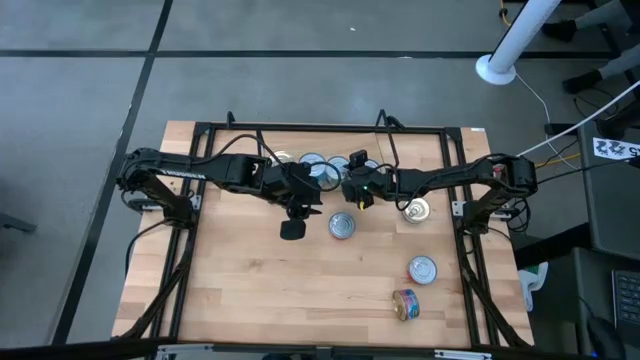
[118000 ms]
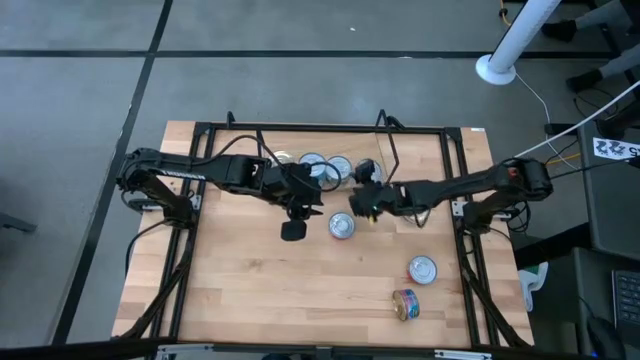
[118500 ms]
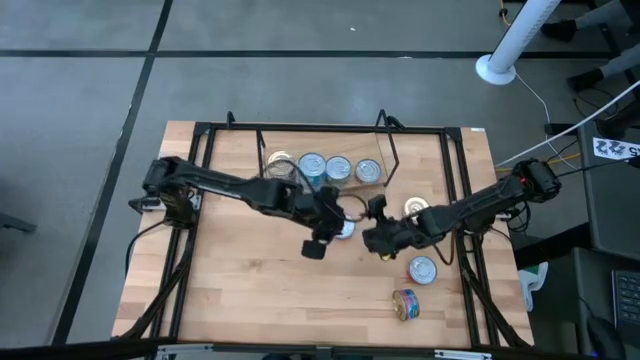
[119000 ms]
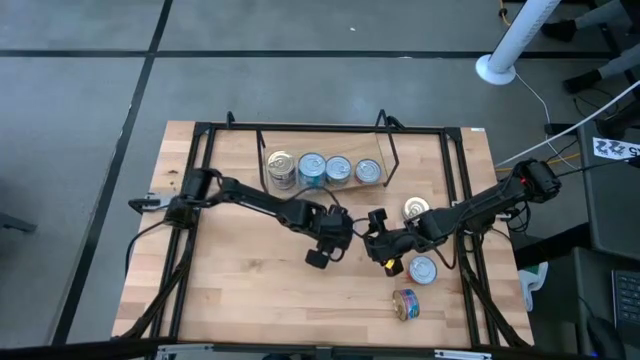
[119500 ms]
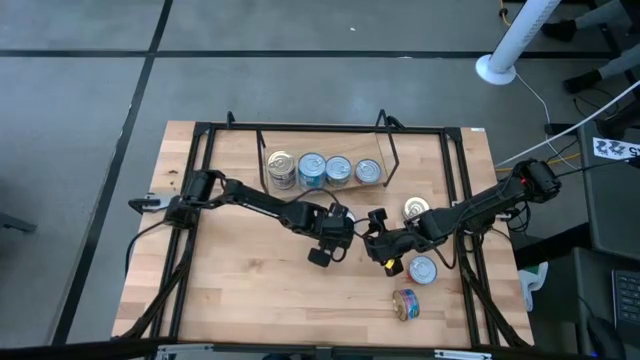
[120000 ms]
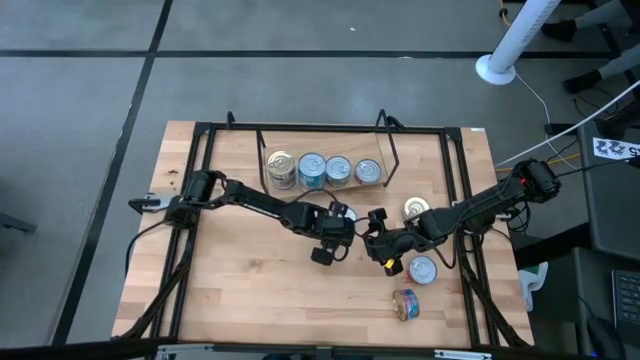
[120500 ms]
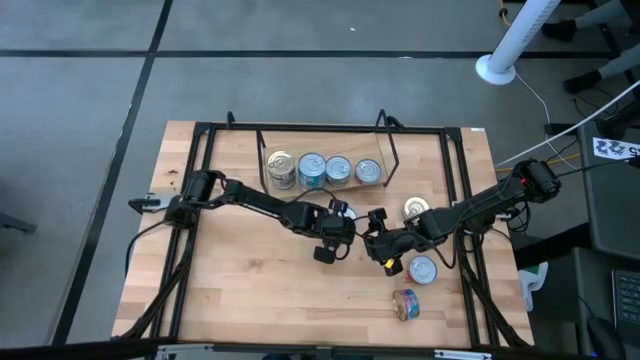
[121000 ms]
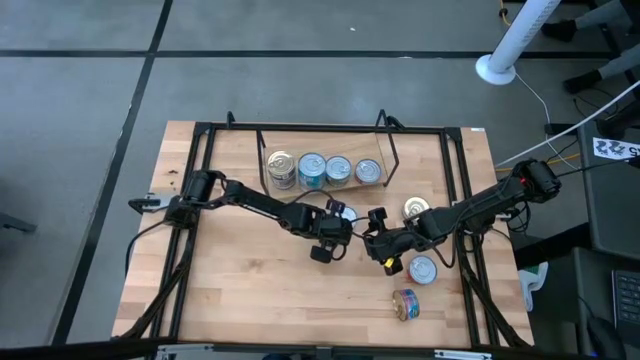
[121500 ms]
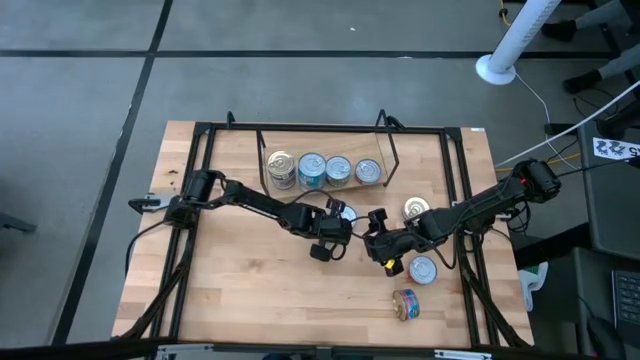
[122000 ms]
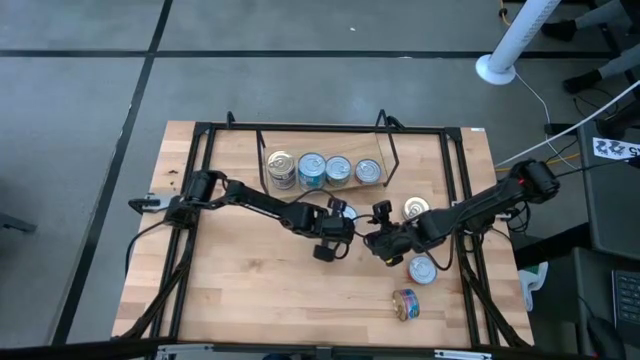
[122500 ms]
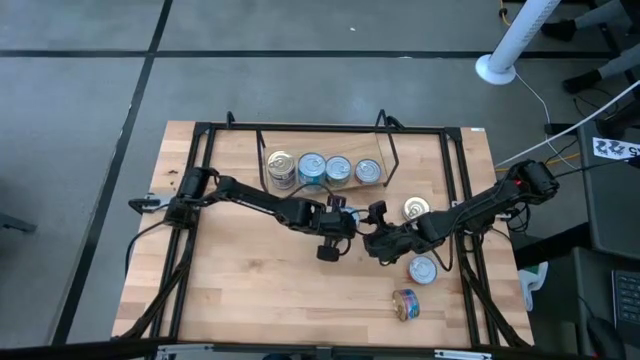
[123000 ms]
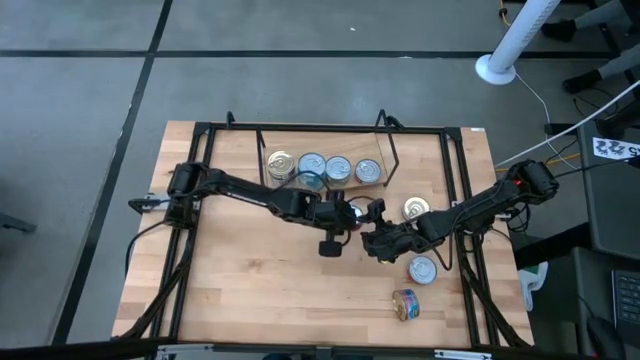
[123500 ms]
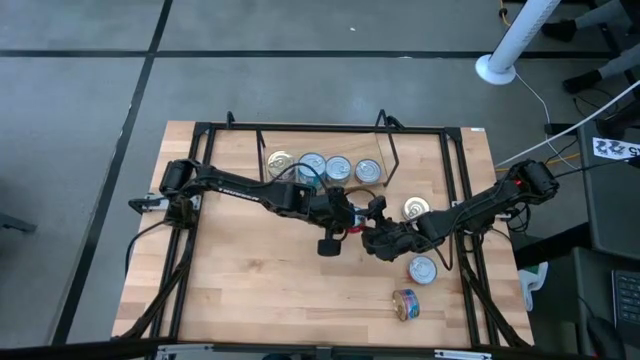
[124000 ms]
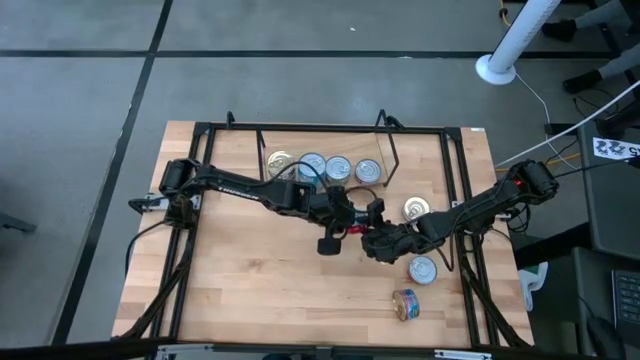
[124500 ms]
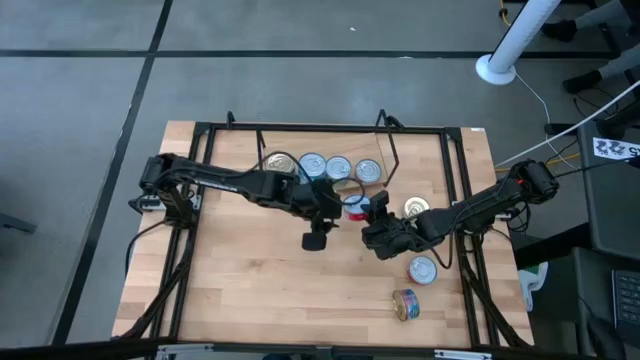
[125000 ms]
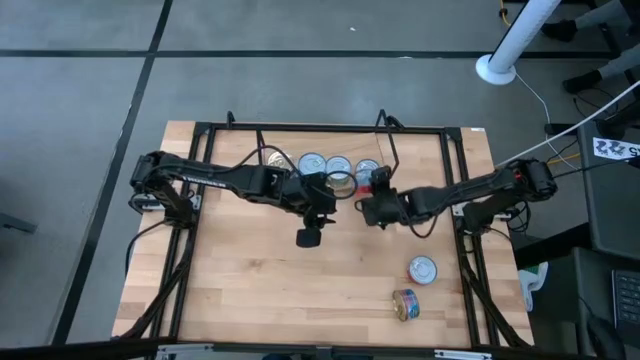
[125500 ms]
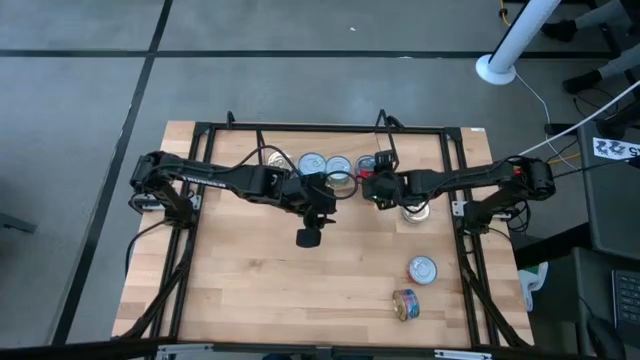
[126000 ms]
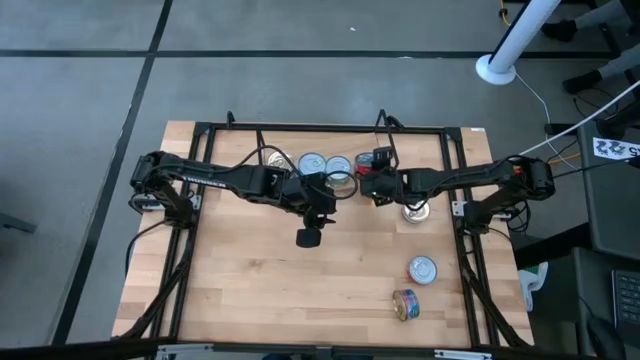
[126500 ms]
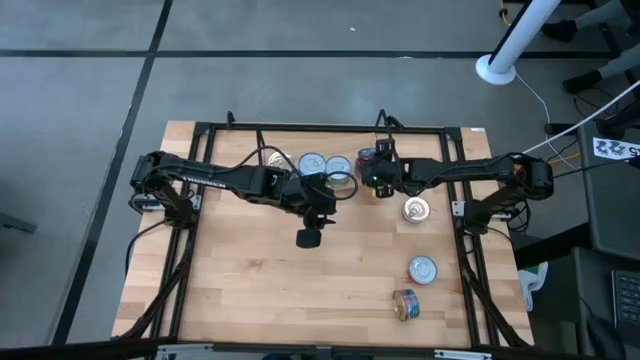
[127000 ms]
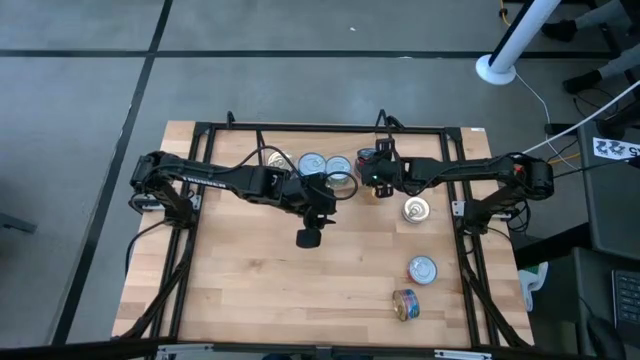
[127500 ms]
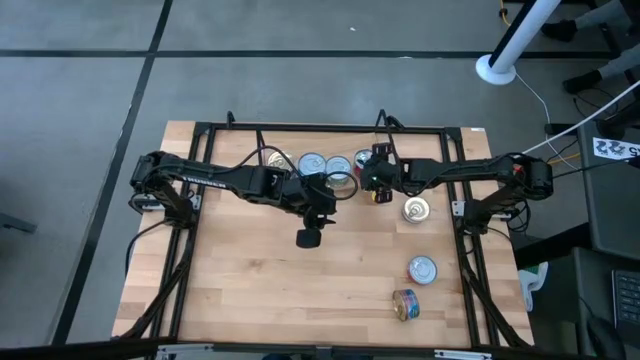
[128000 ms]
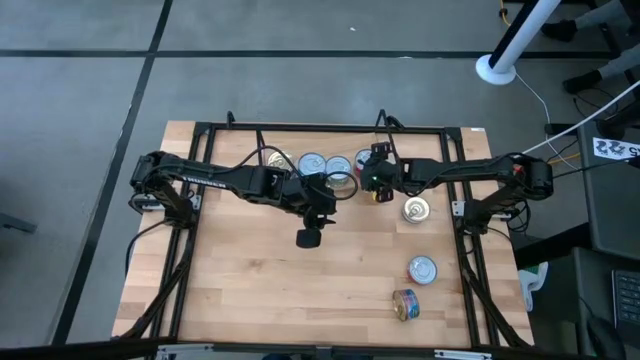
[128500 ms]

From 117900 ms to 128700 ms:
Task: Stack canned seafood by type on shelf
Stack the top red tuna can on top of the other red tuna can on the shelf

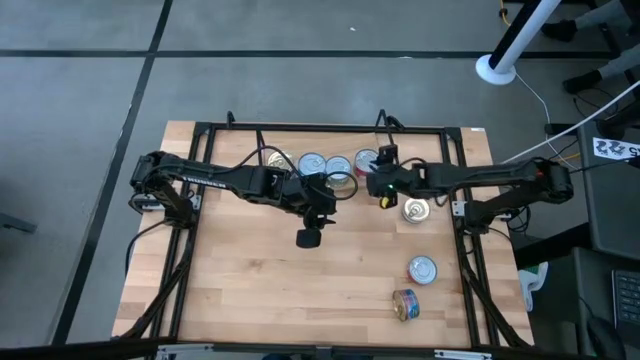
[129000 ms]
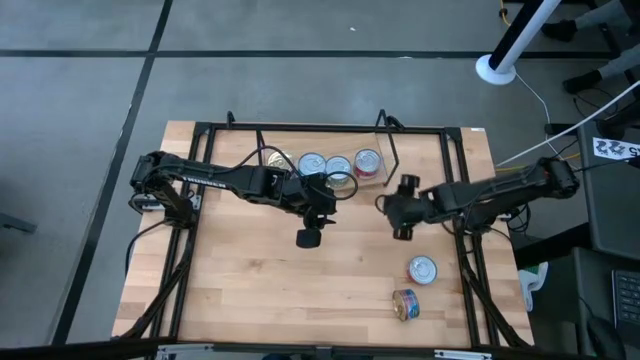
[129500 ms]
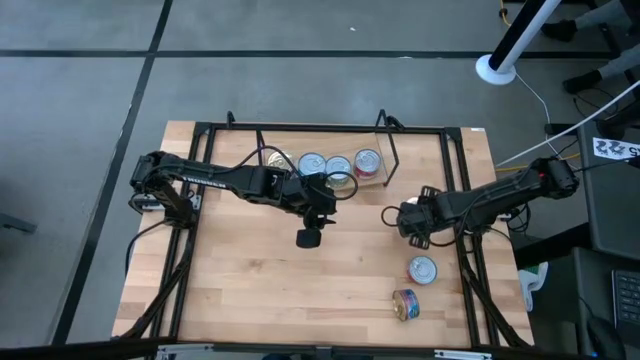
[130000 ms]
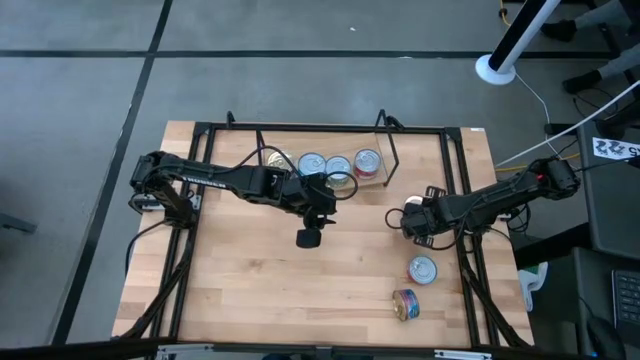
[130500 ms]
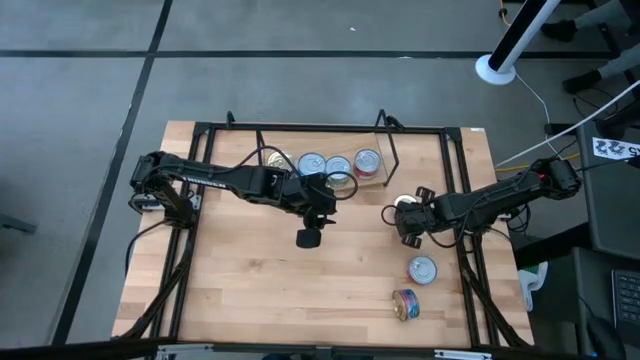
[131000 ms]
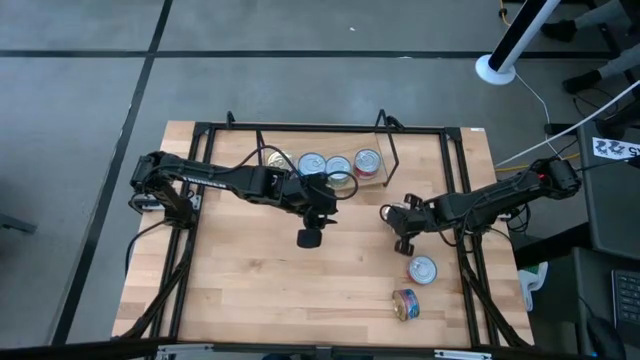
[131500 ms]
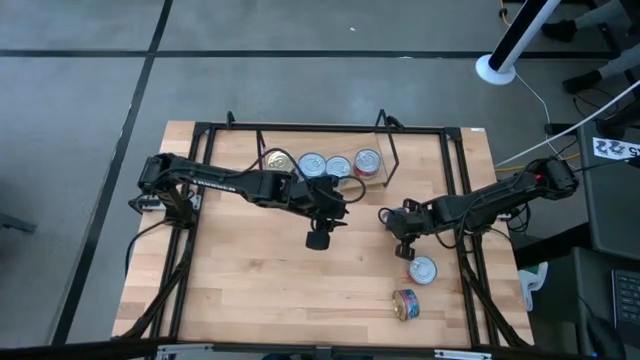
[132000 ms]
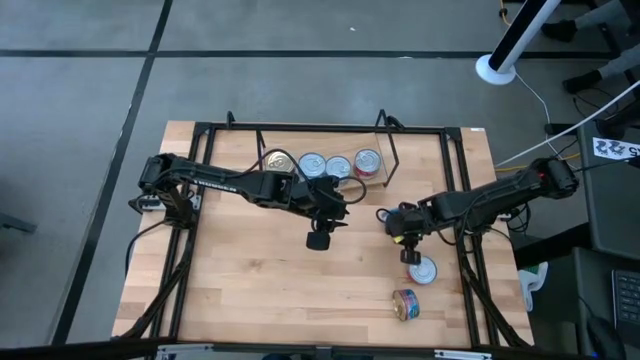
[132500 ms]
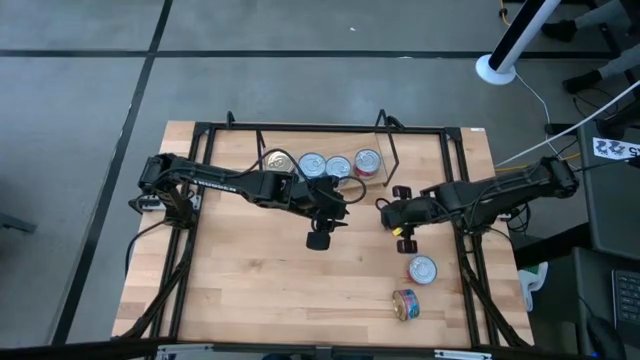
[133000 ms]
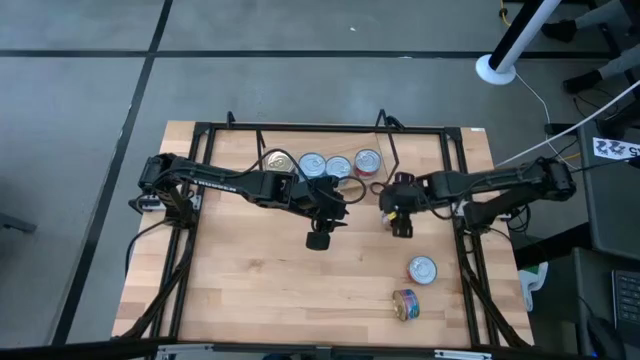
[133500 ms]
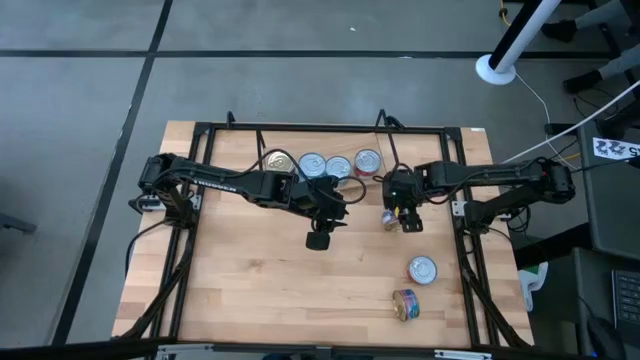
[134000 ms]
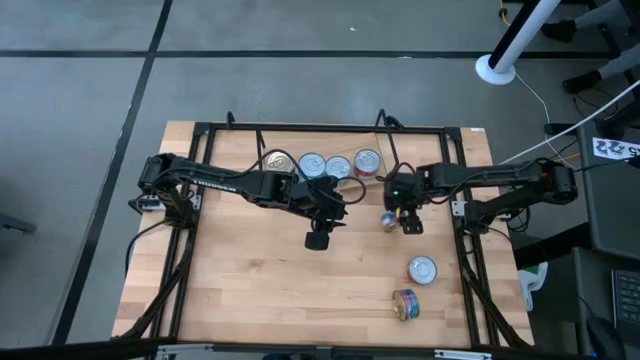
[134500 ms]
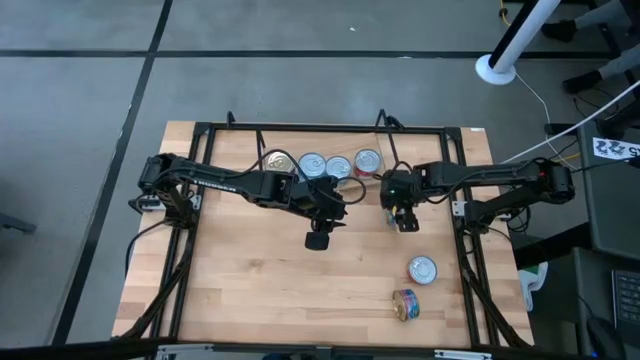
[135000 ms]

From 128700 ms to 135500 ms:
Stack the blue and pink tuna can on top of the other blue tuna cans on the shelf

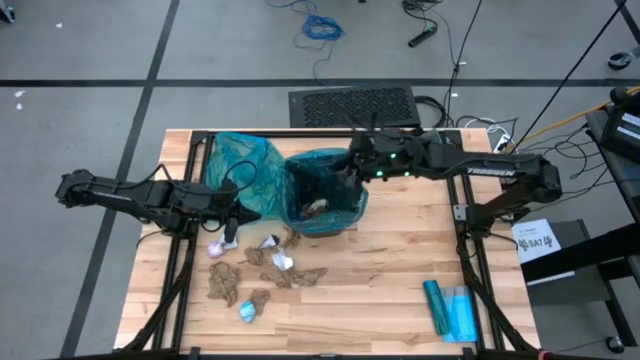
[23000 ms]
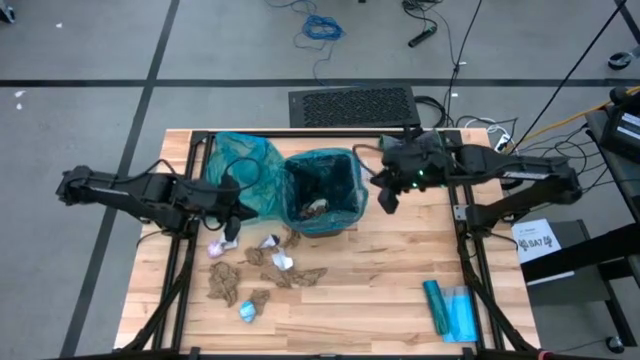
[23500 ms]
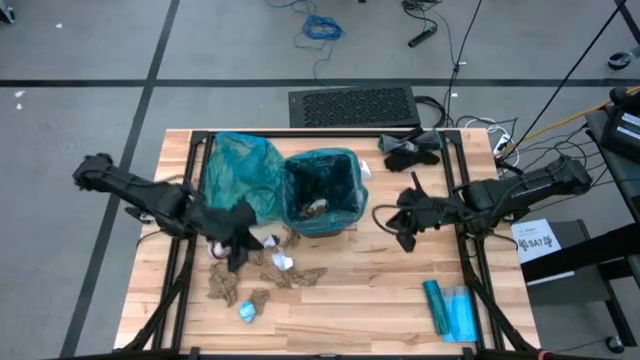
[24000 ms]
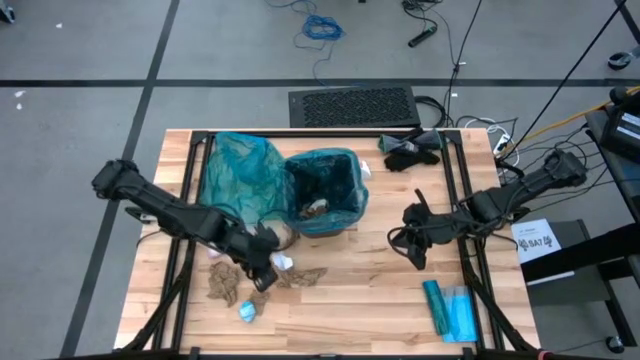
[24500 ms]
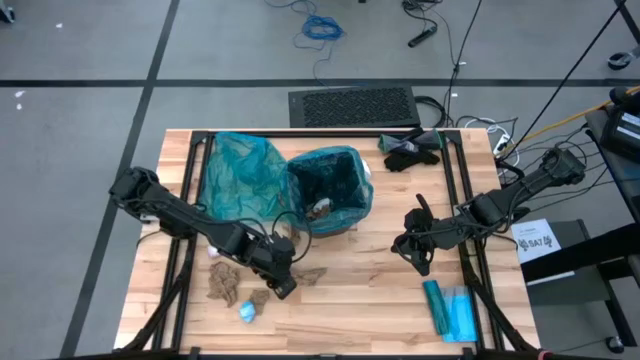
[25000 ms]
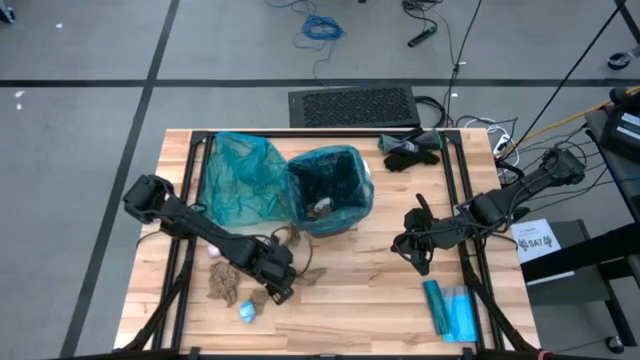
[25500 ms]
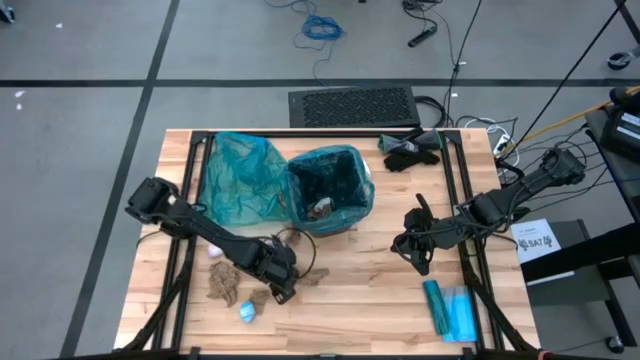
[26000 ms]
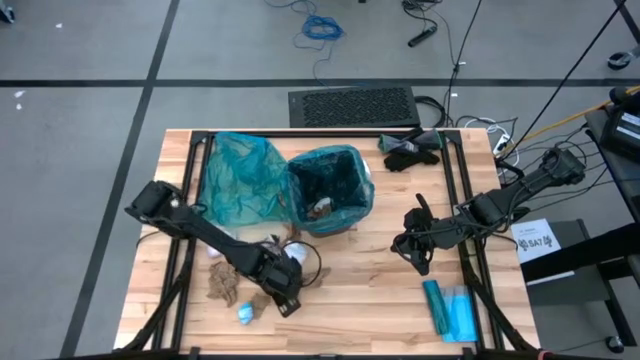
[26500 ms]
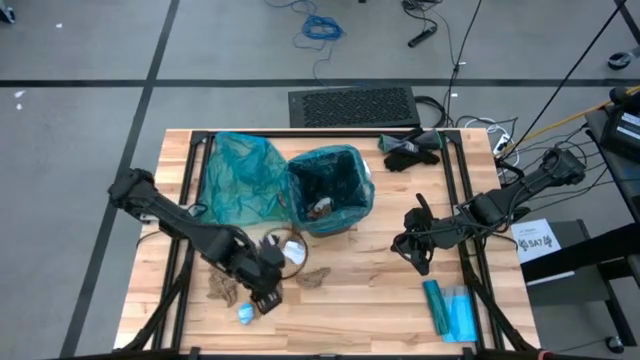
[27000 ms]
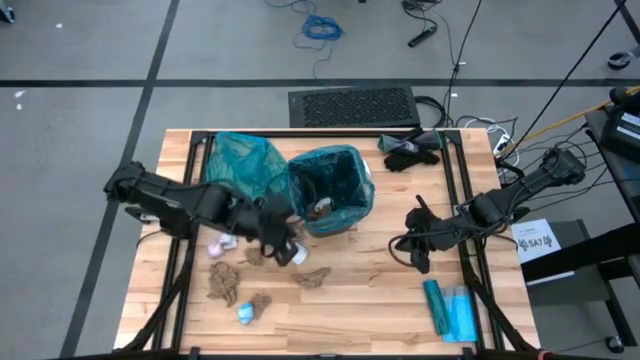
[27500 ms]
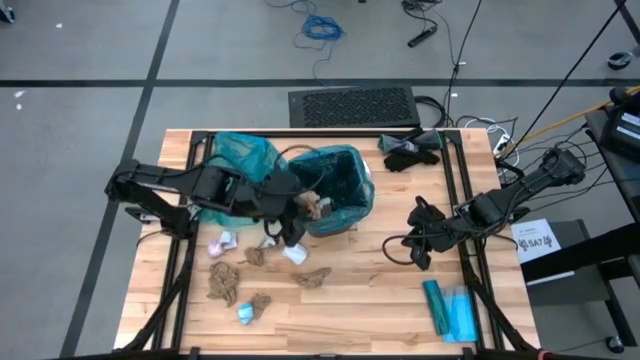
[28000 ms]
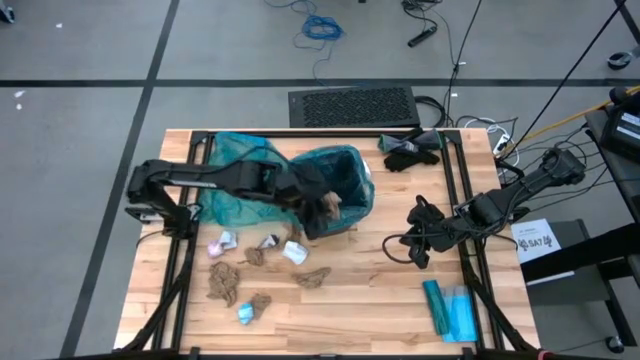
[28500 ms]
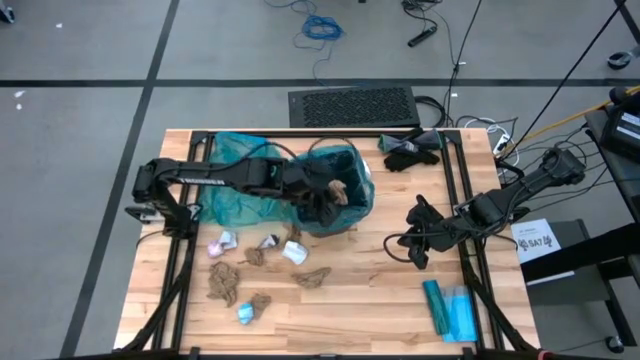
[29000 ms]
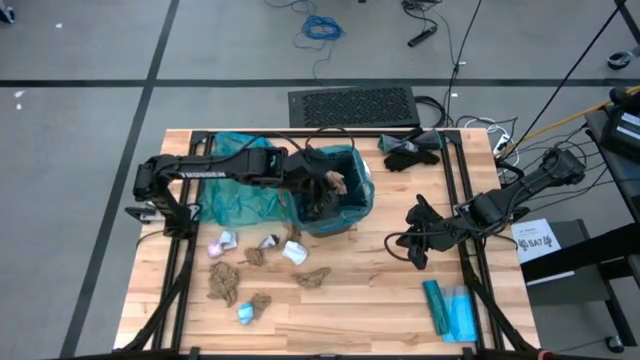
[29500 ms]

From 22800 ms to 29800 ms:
Task: place trash/remove bag and relplace
Put the brown napkin into the trash bin
